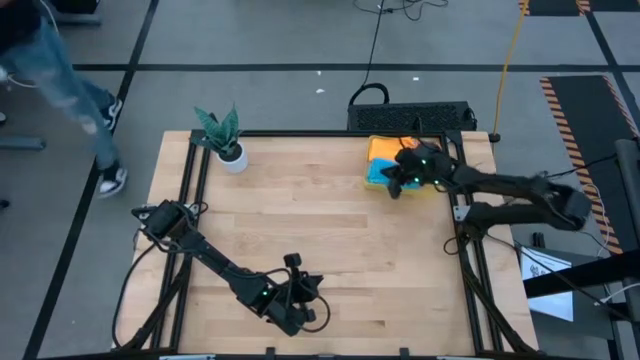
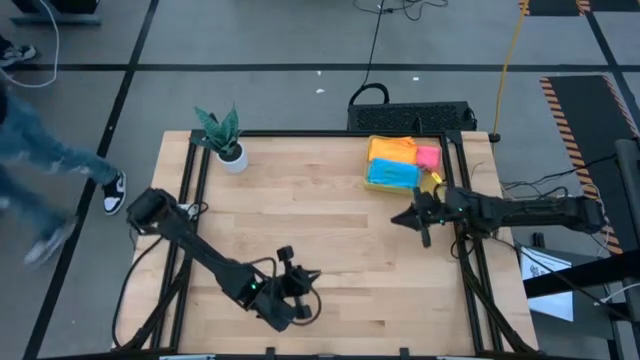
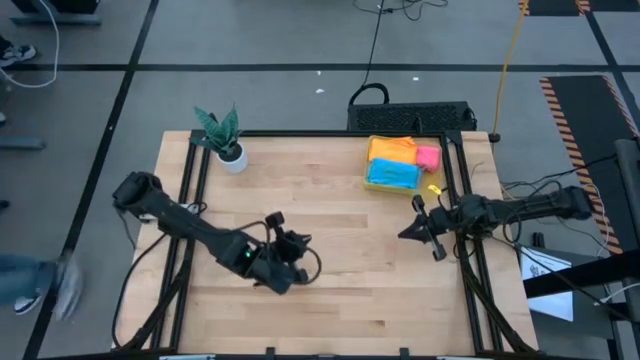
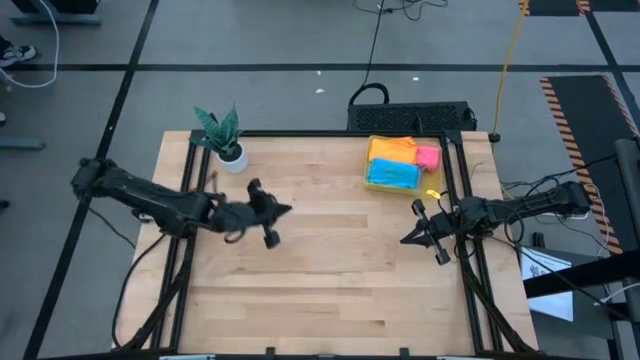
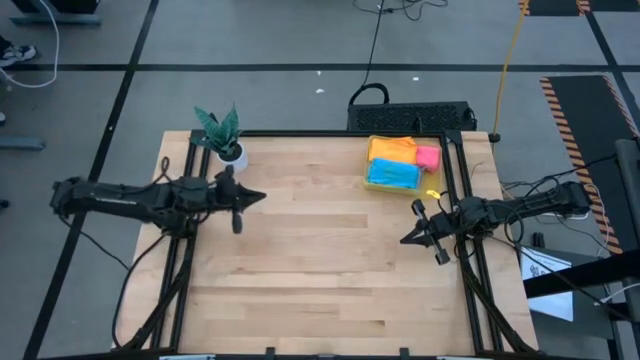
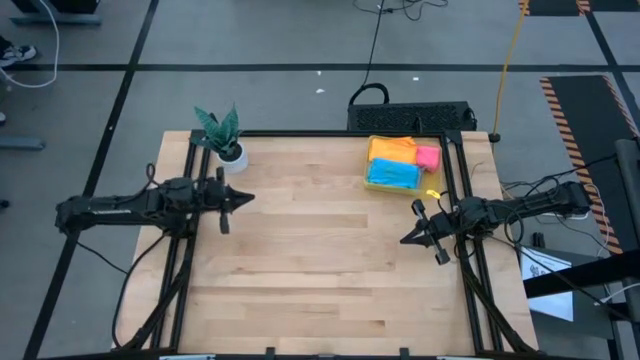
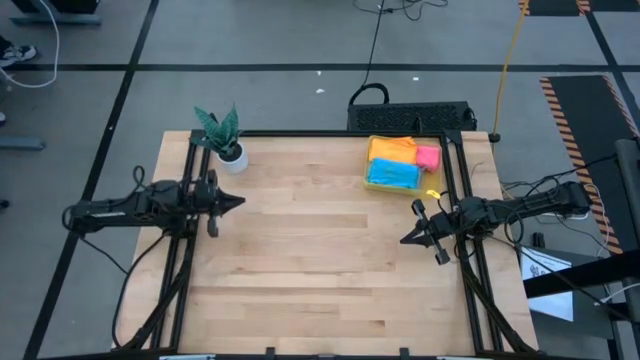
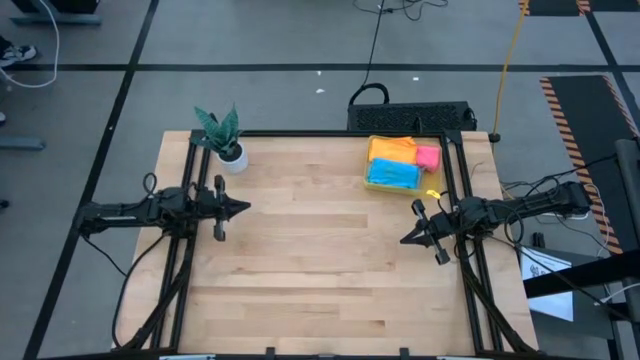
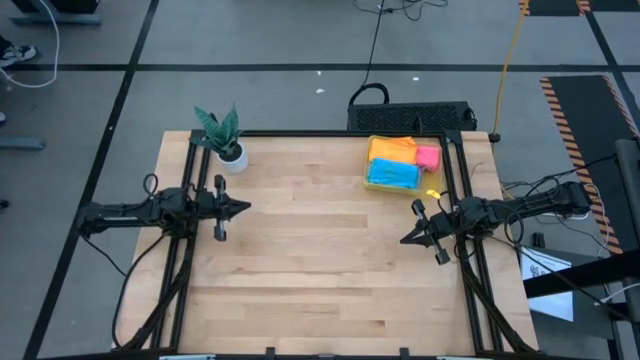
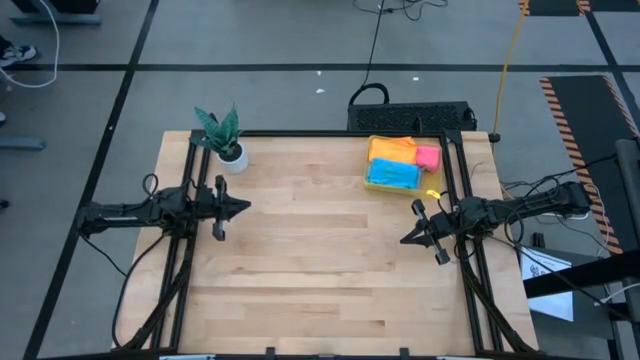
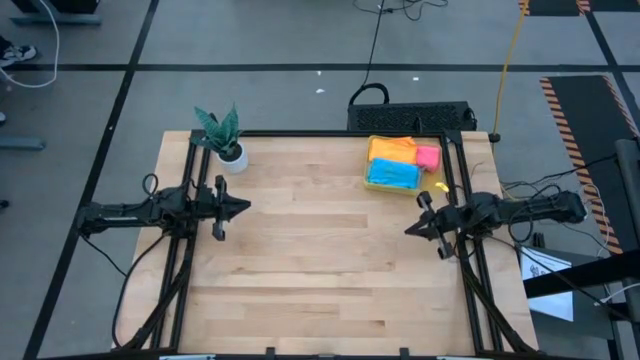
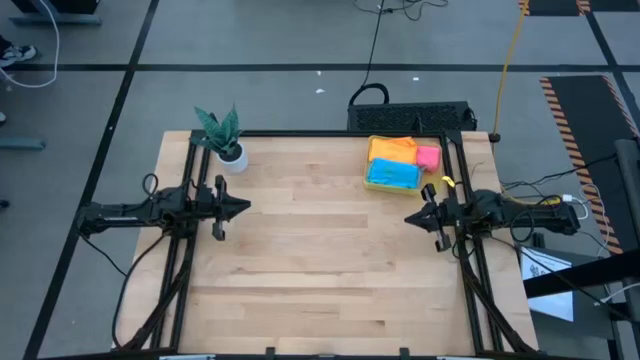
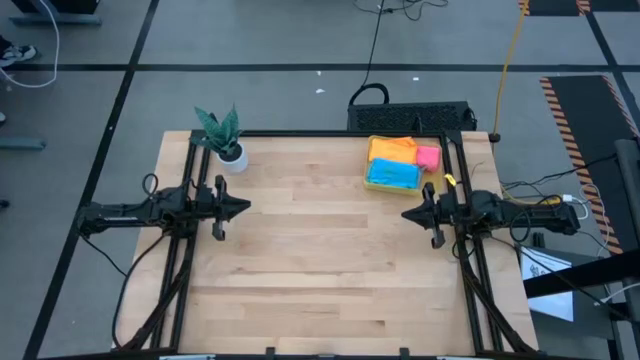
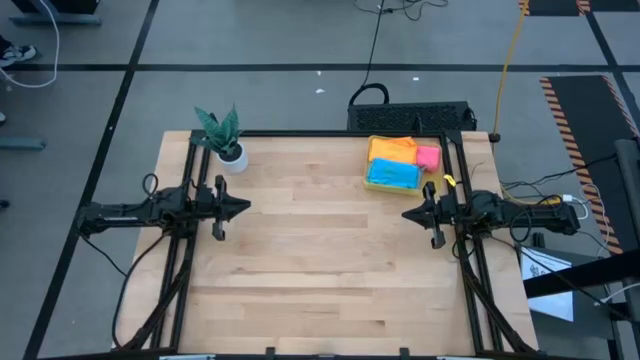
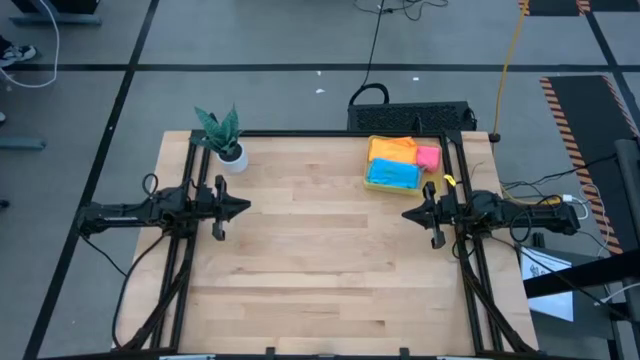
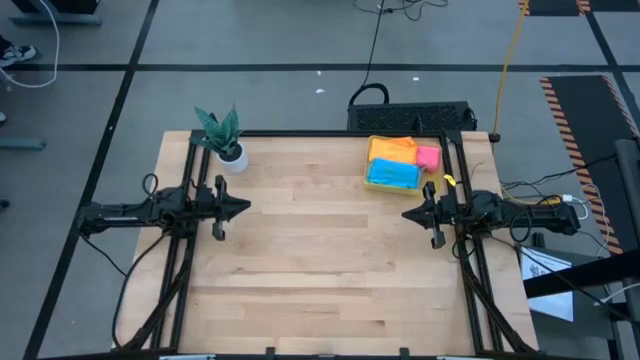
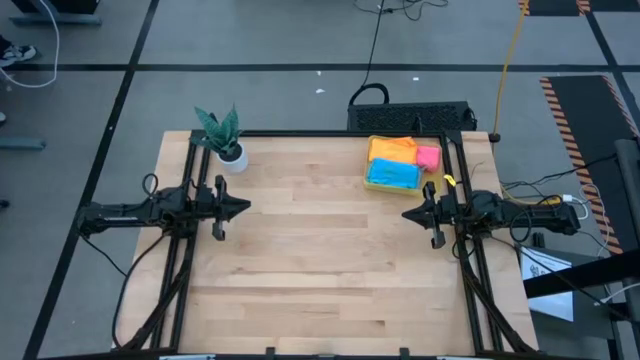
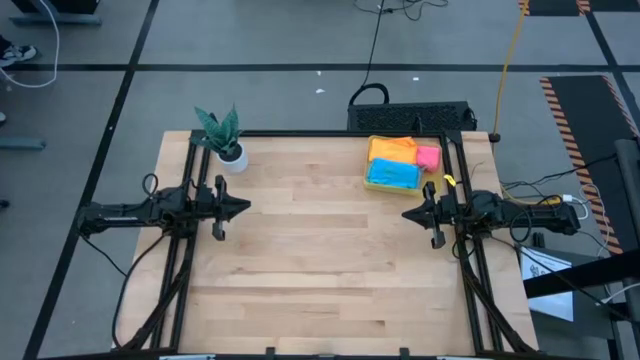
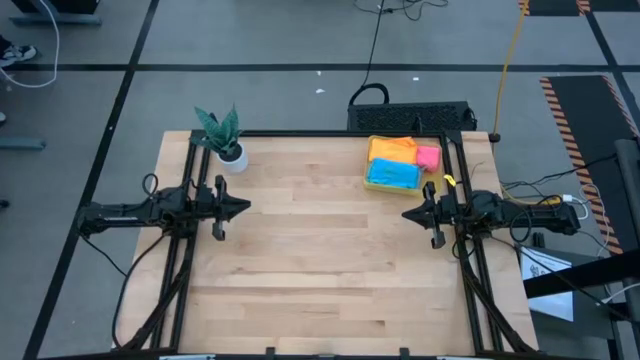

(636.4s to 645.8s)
Task: Fold microfiber towels
Return to Home Position

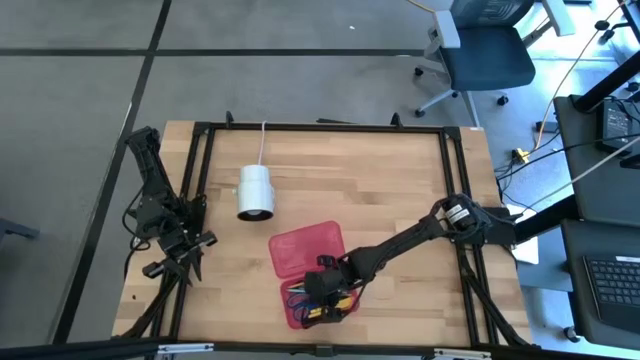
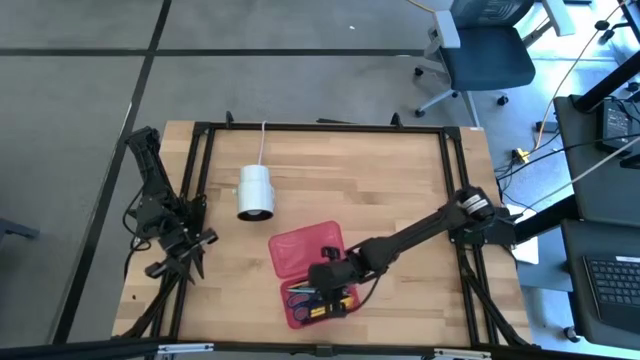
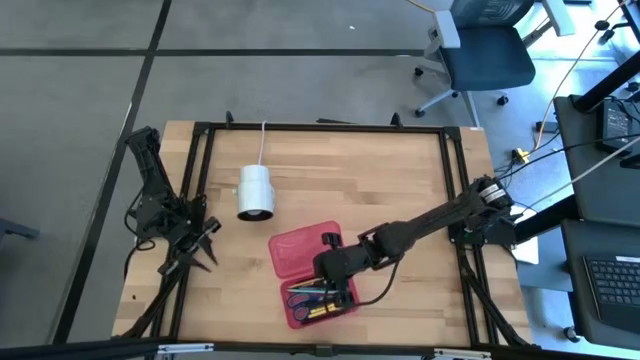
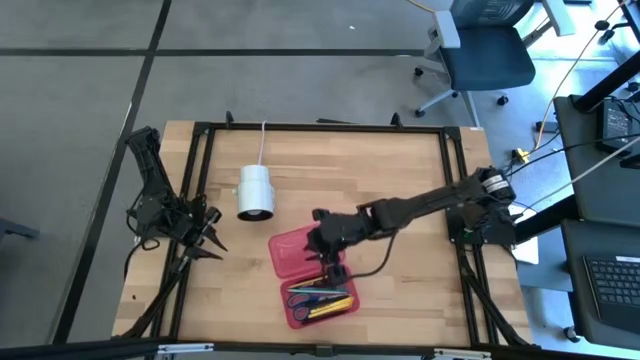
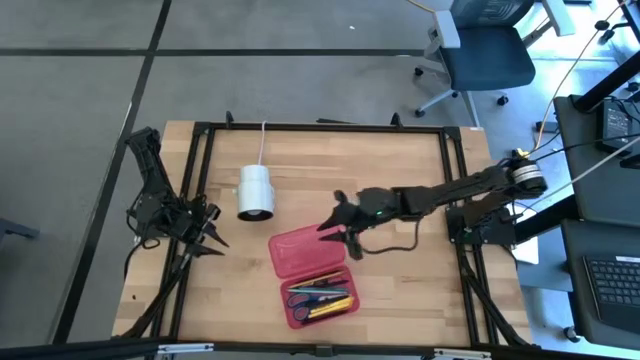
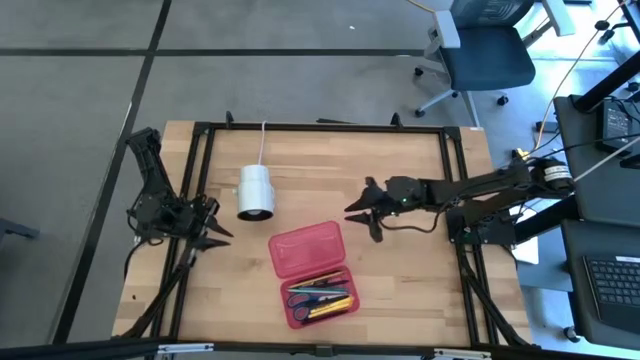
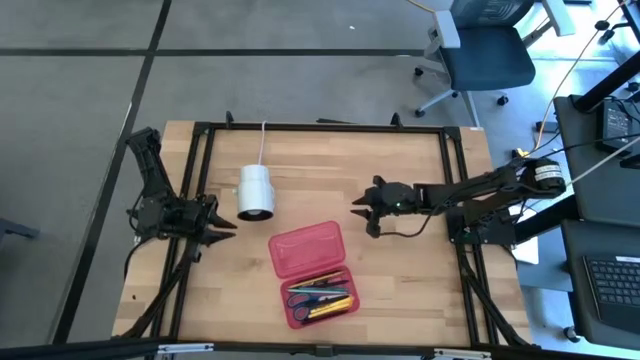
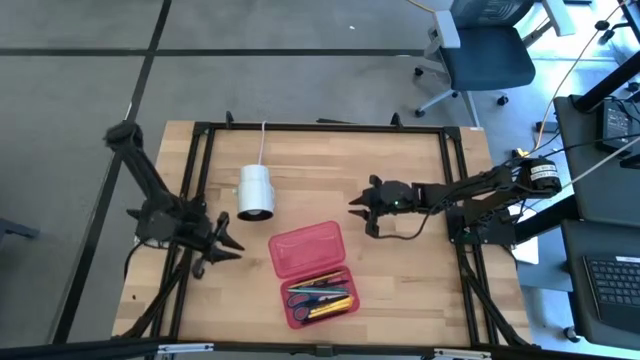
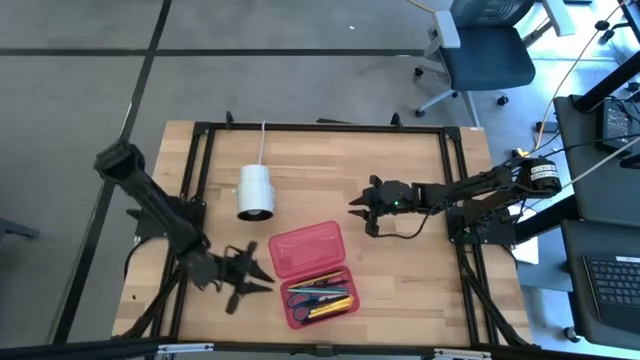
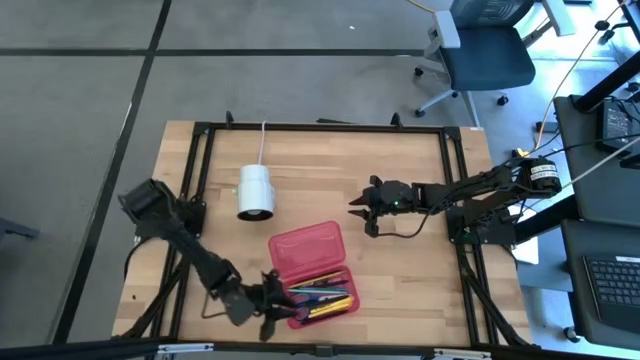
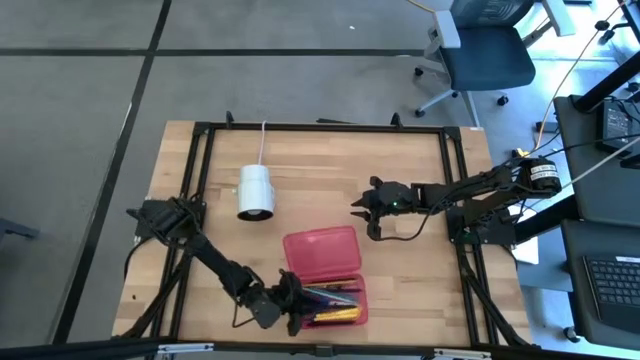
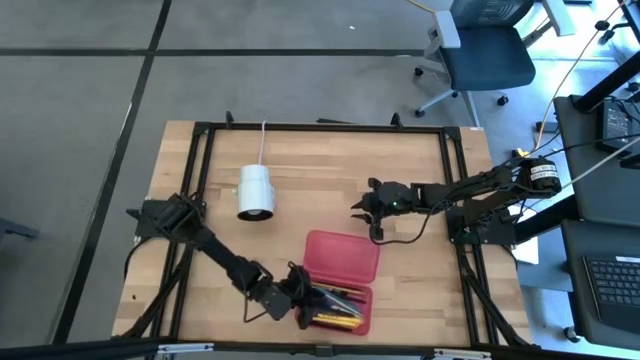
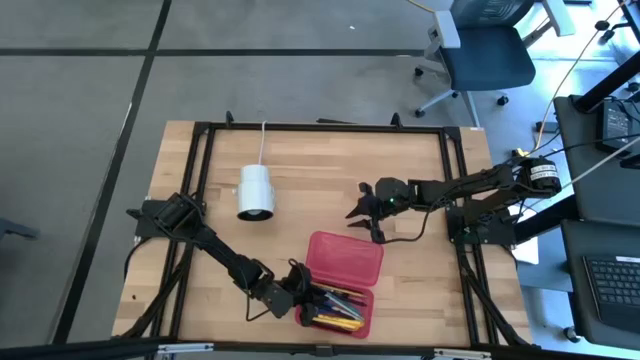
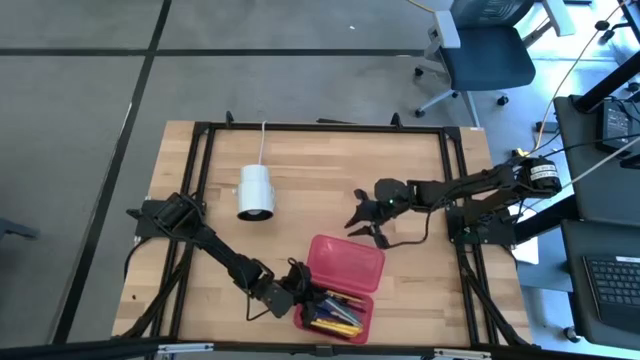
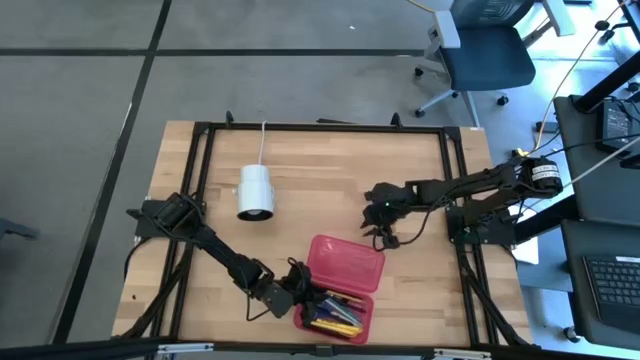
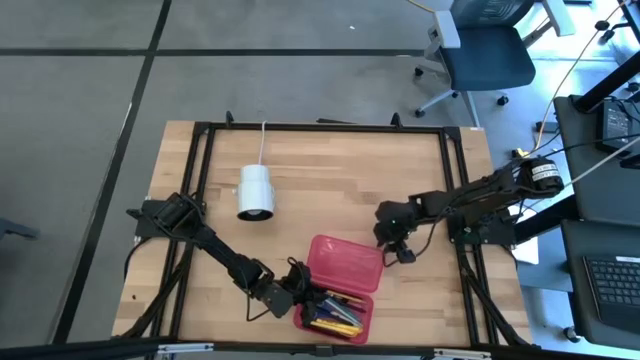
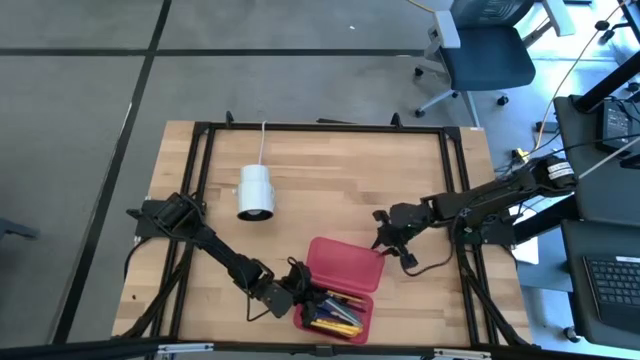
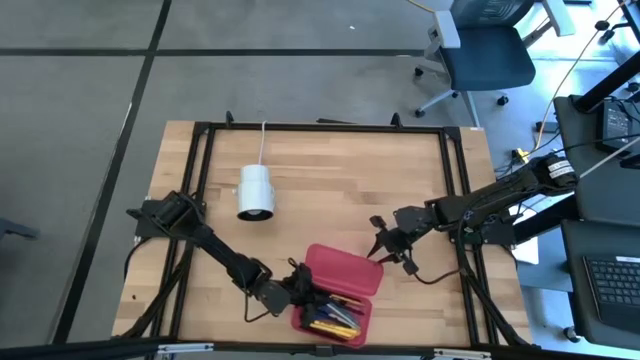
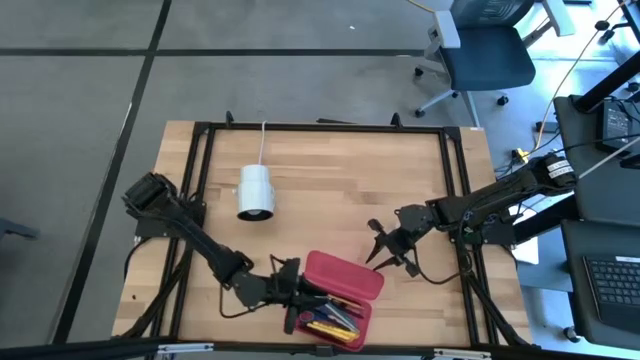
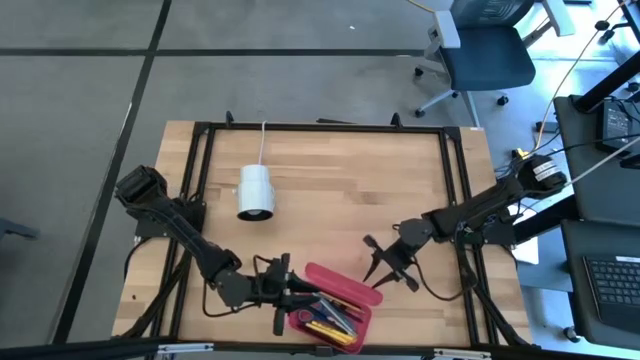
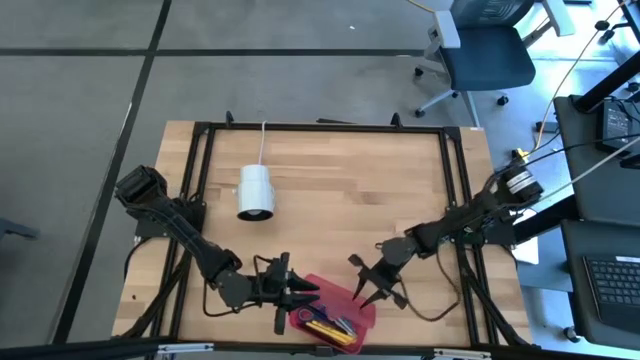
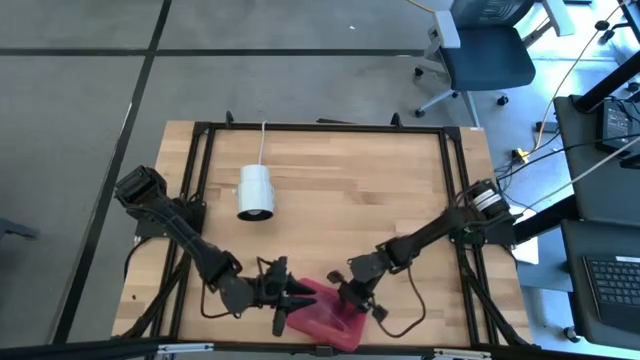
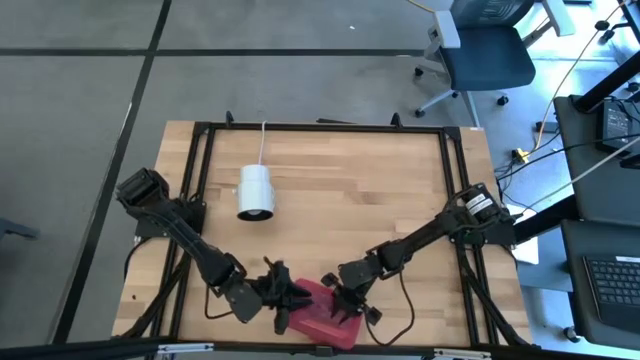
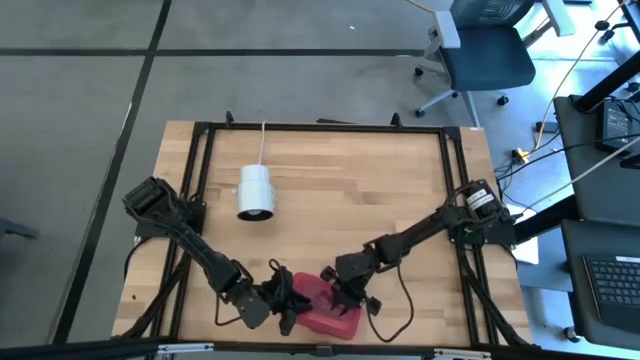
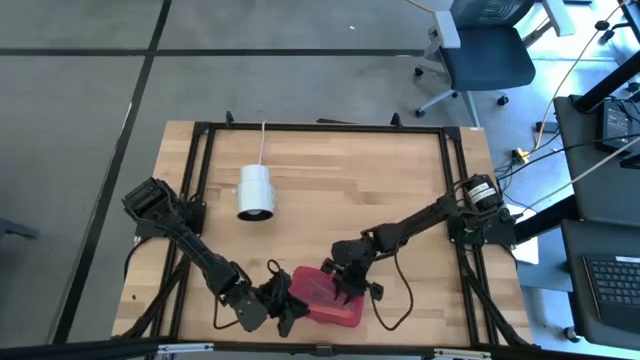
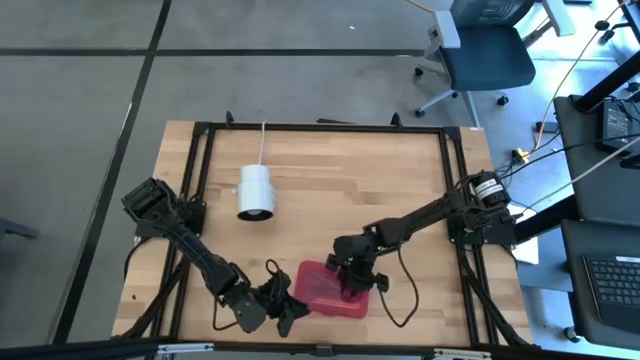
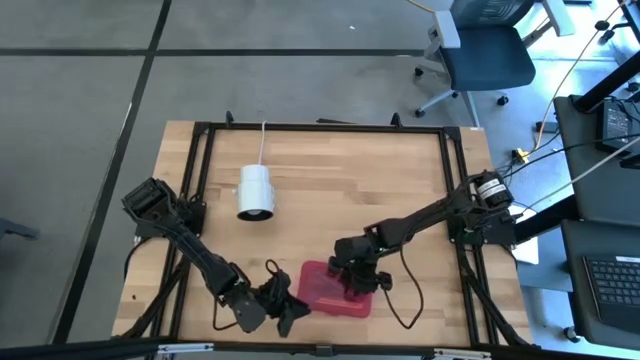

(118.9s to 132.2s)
Task: Pick & place school supplies into a supply box
Close the pink supply box
